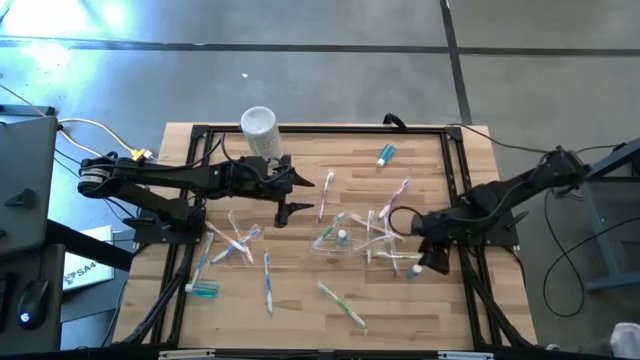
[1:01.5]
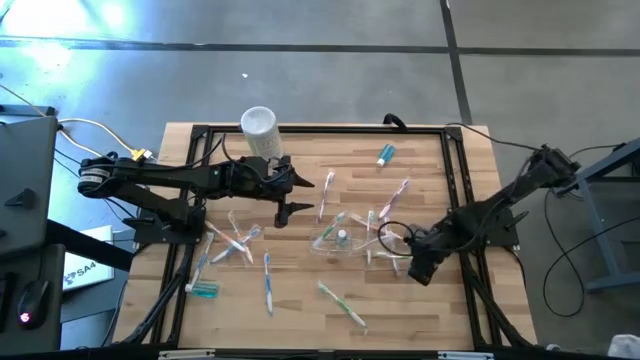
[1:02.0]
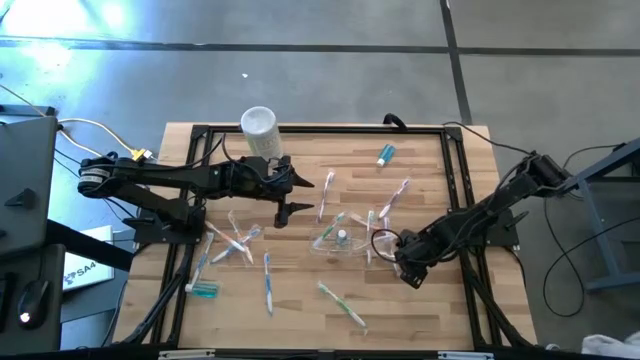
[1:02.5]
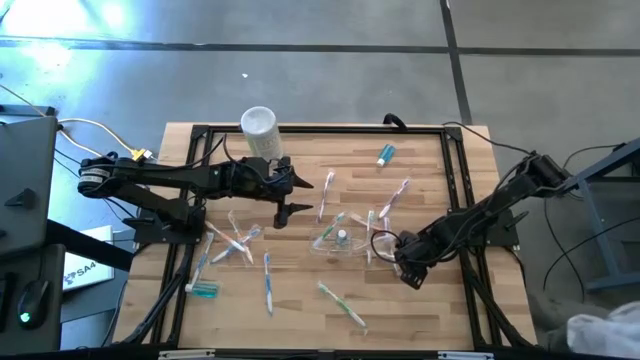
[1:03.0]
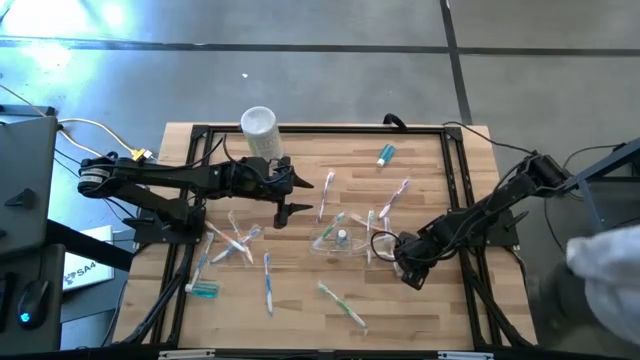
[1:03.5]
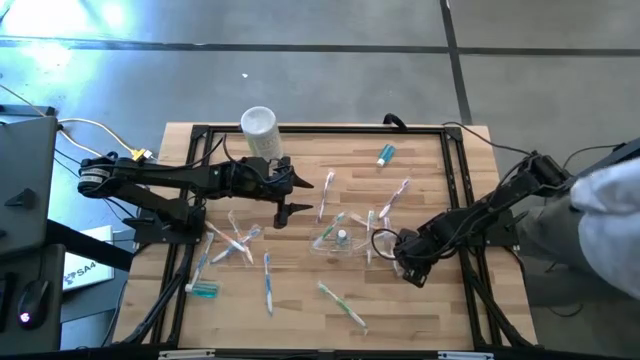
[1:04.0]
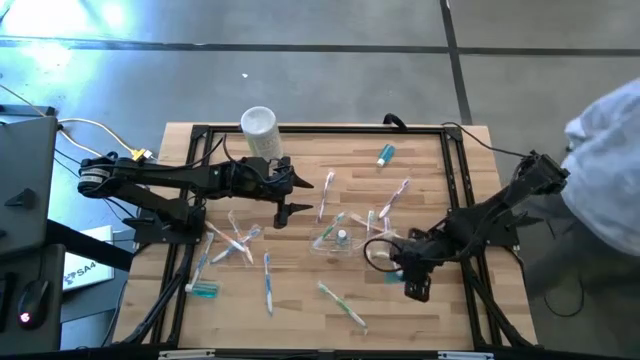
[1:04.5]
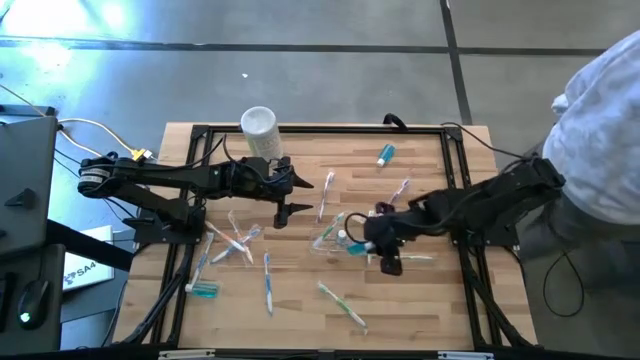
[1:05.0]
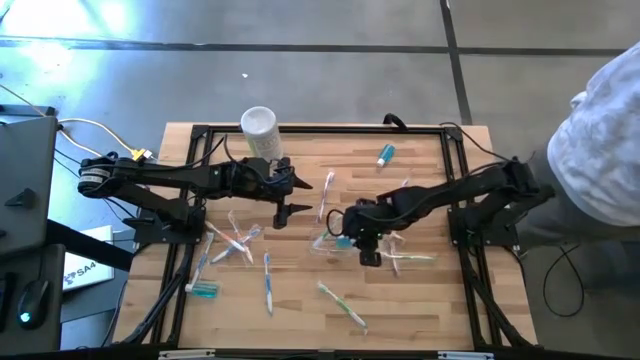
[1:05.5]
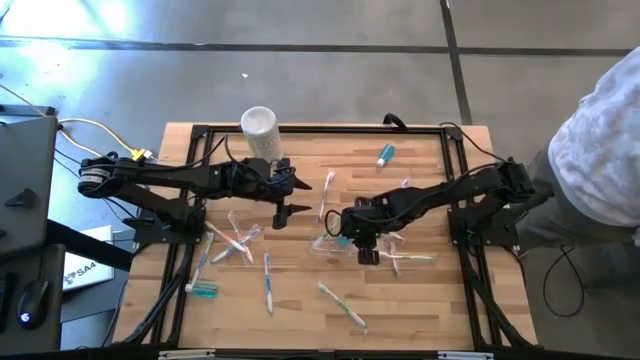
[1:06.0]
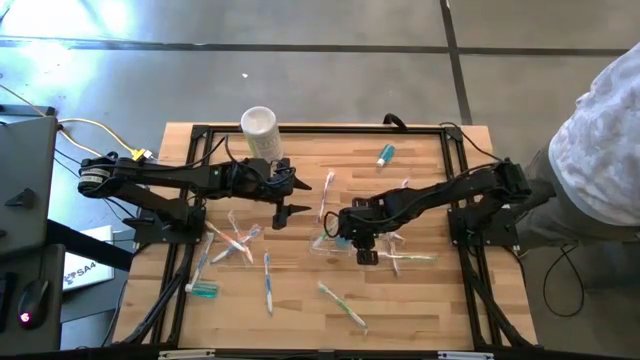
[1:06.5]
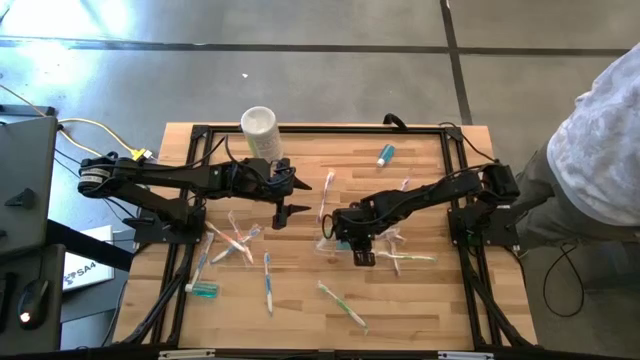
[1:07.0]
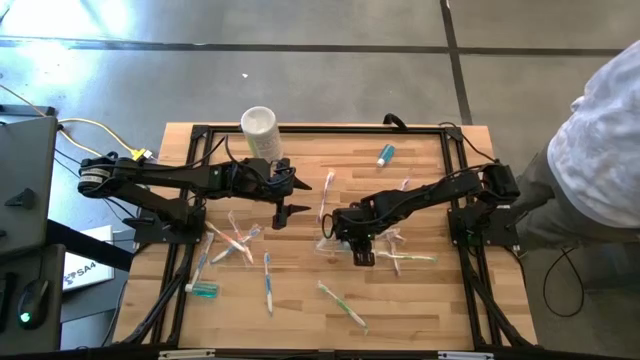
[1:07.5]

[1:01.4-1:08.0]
Task: Pick & Place toothbrushing station
Put the blue mouthwash into the middle section of the transparent organizer

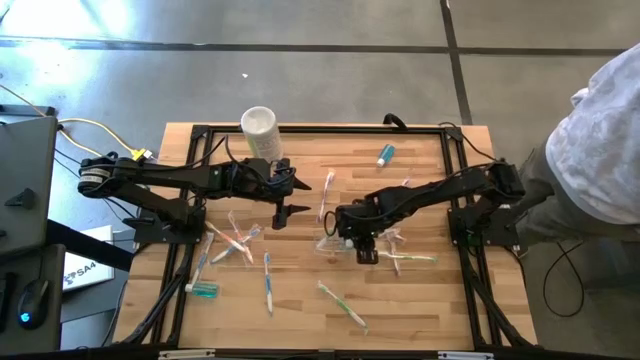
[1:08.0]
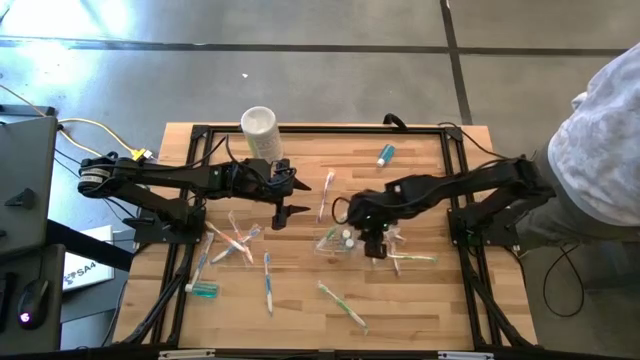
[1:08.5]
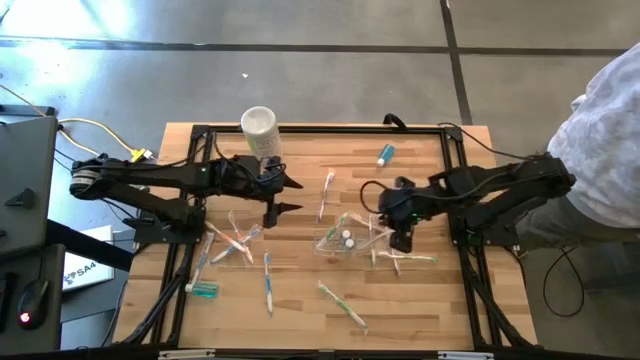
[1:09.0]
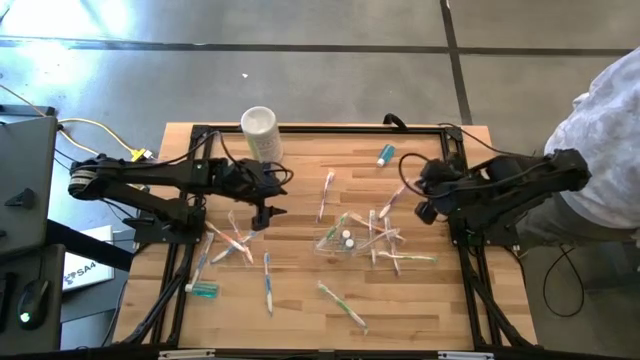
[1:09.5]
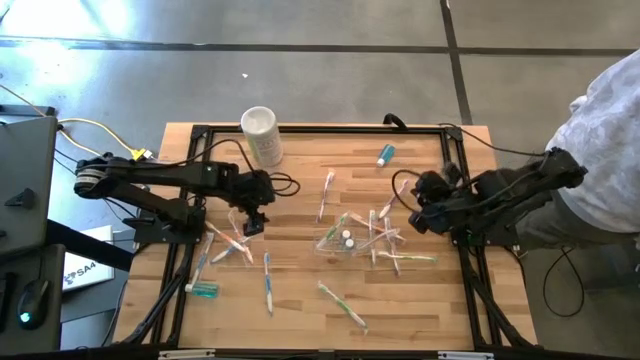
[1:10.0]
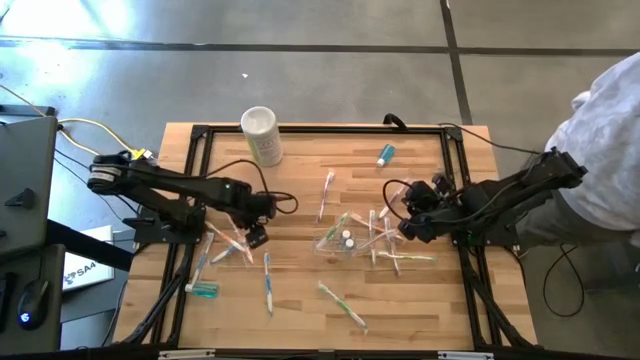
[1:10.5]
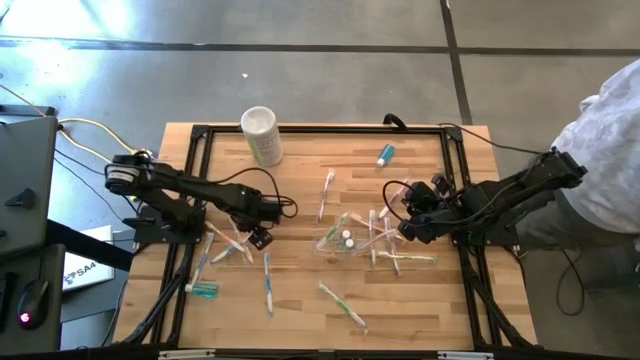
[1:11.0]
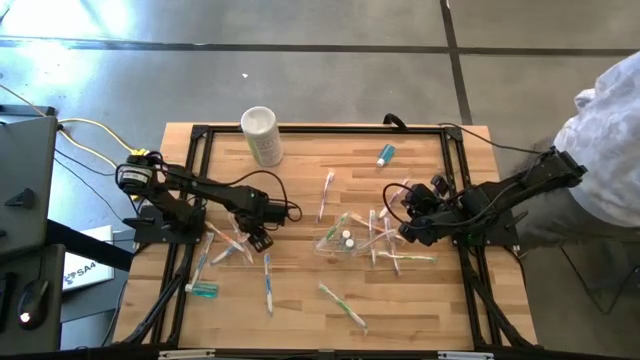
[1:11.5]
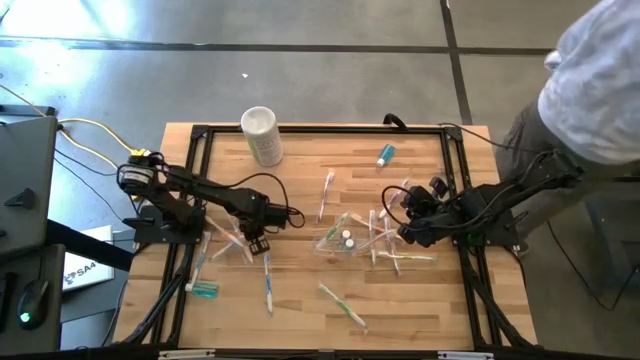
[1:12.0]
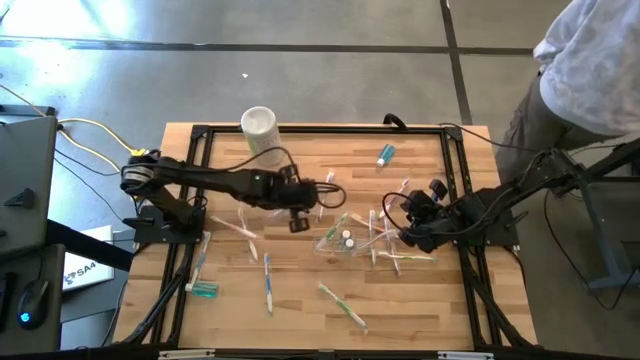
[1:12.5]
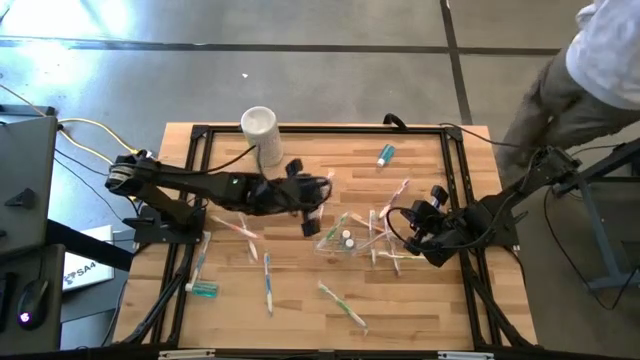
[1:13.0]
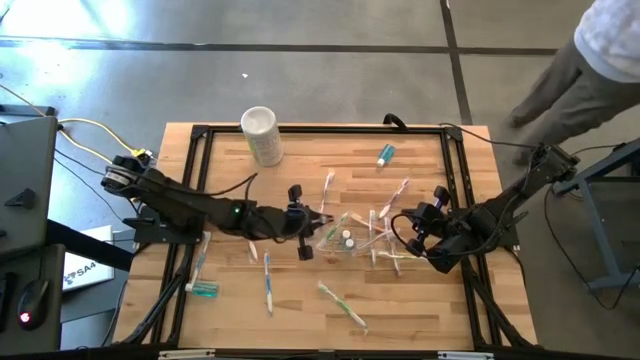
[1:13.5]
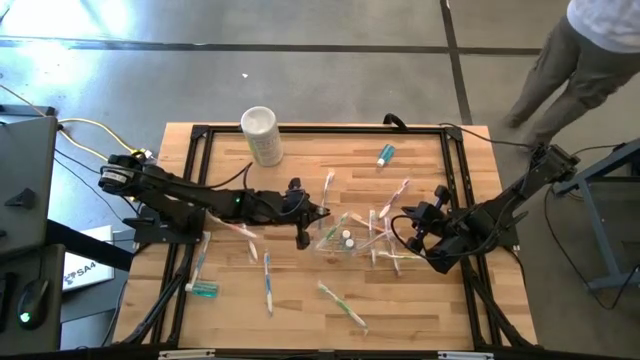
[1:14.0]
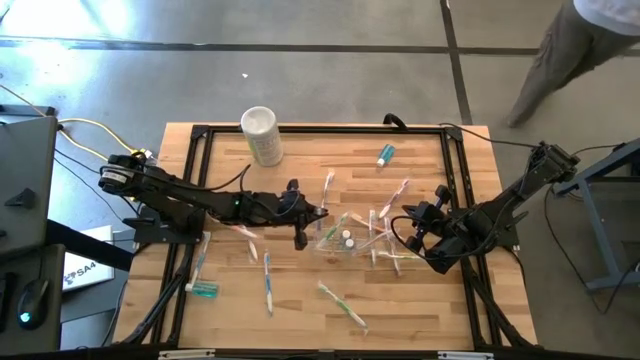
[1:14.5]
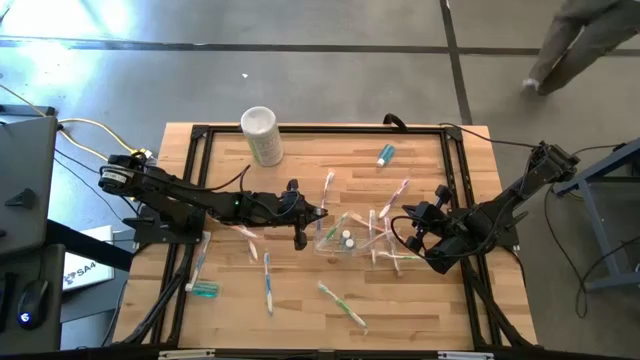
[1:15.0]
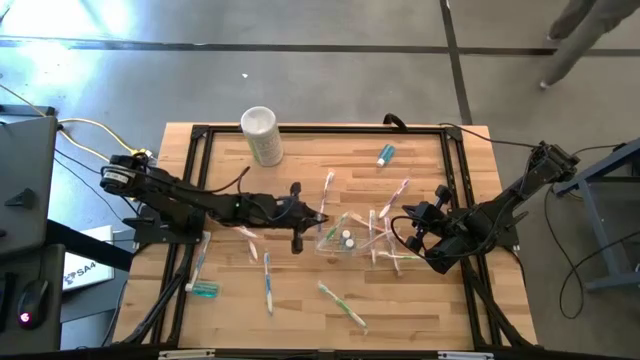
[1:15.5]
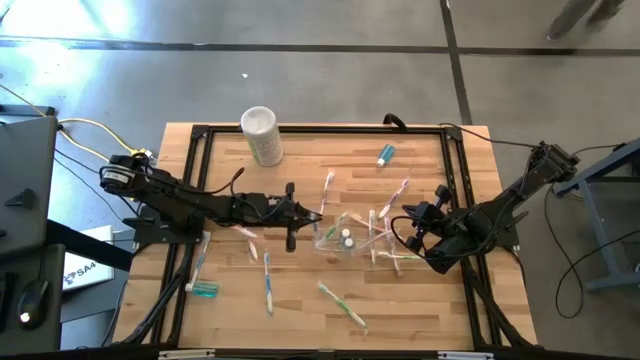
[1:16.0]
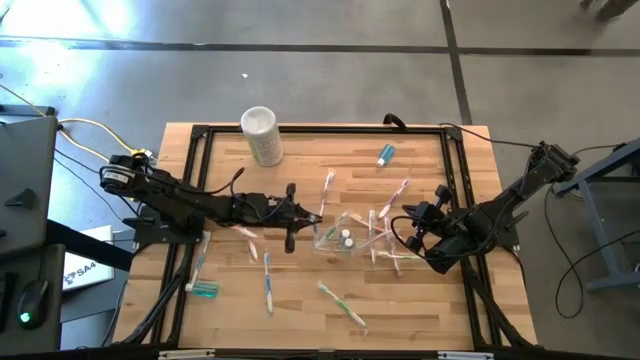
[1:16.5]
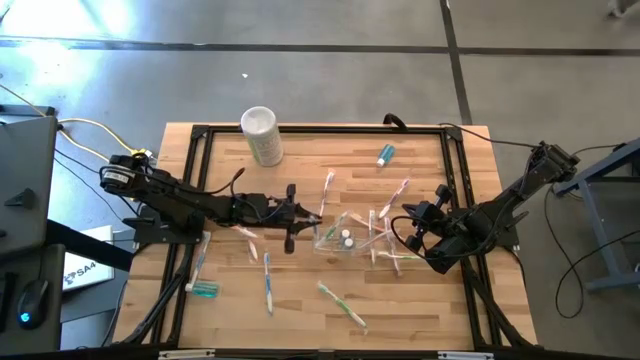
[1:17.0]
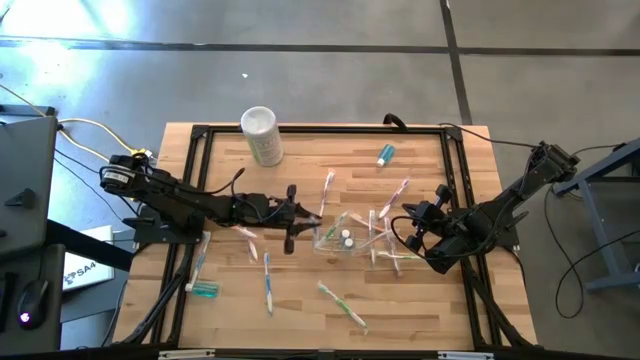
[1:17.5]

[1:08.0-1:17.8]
Put the blue toothbrush into the left section of the transparent organizer

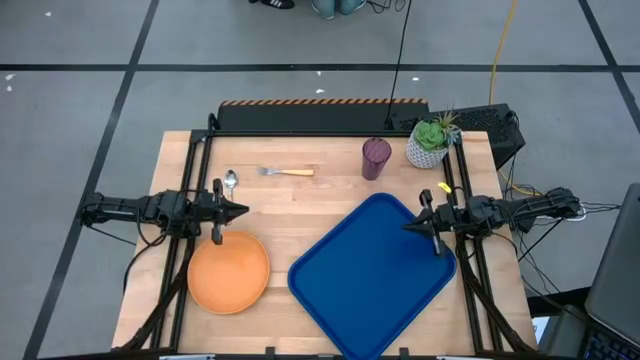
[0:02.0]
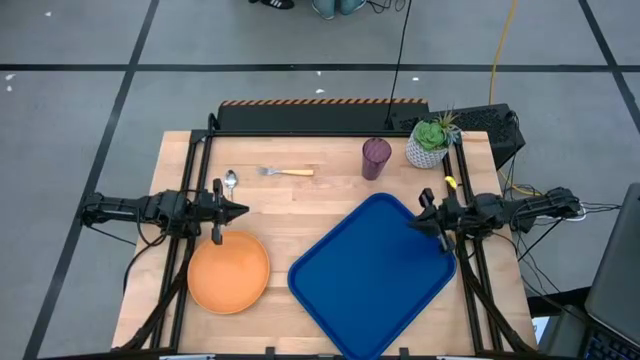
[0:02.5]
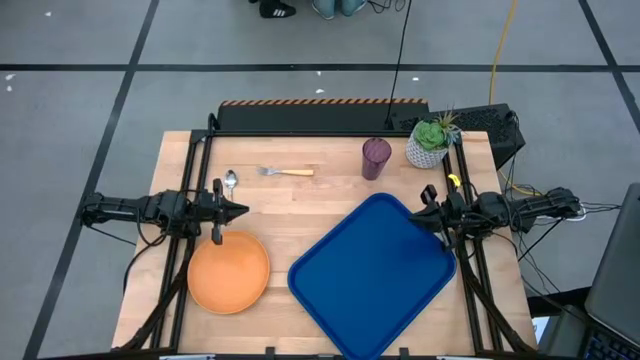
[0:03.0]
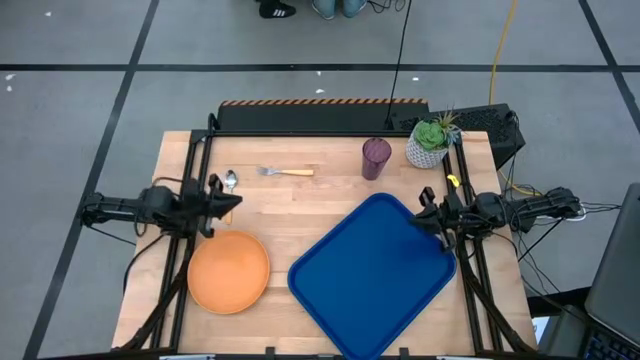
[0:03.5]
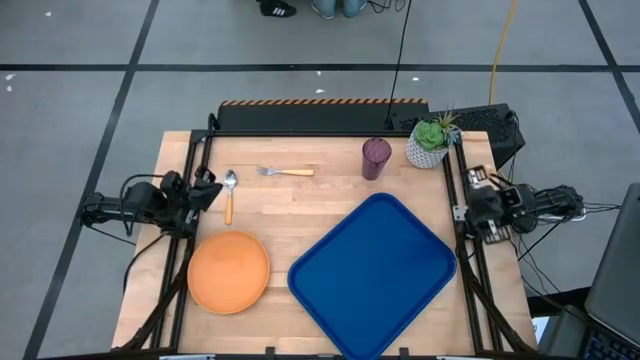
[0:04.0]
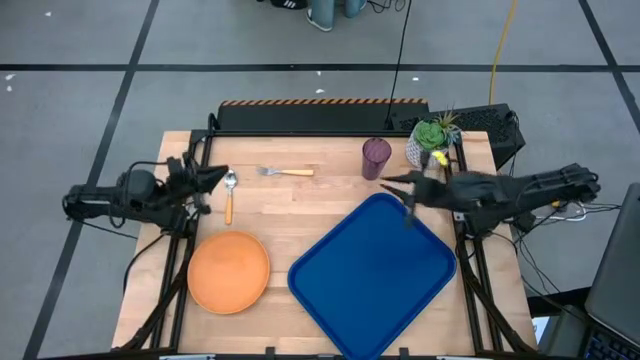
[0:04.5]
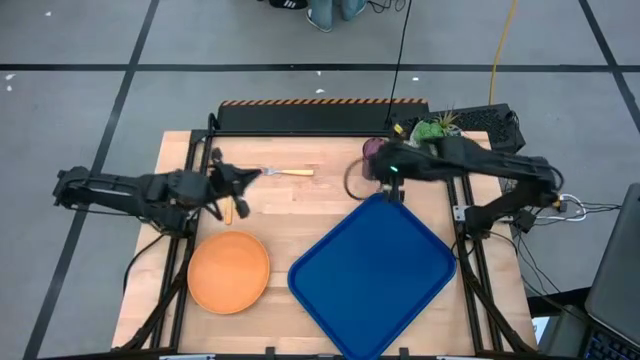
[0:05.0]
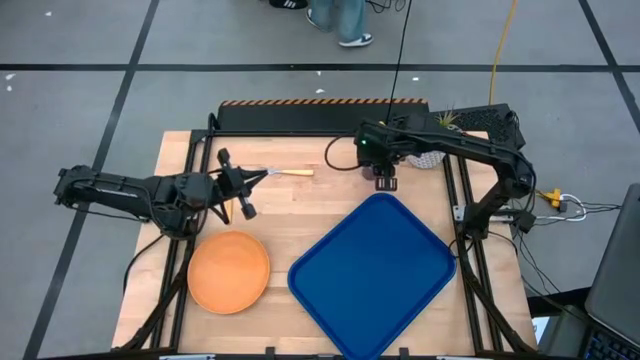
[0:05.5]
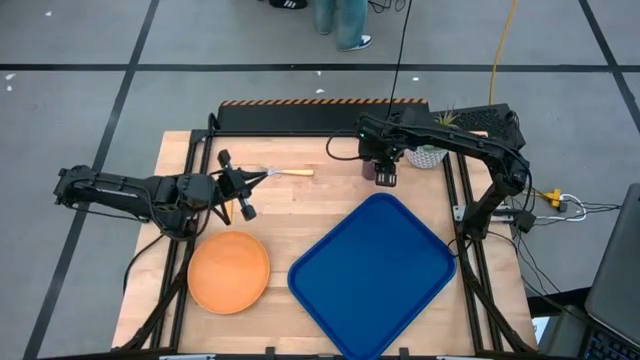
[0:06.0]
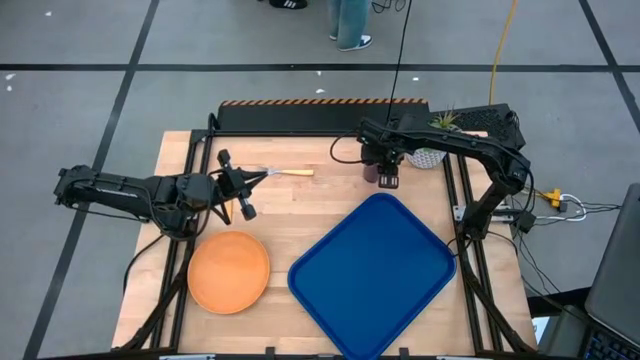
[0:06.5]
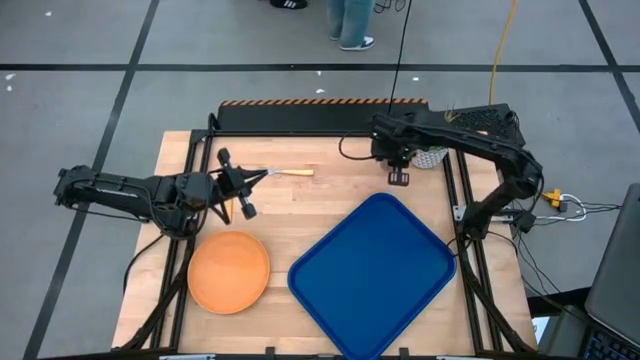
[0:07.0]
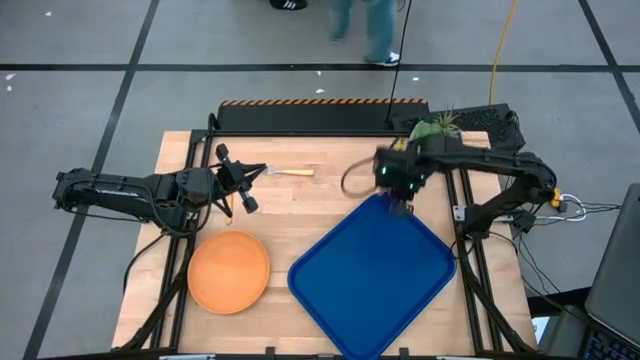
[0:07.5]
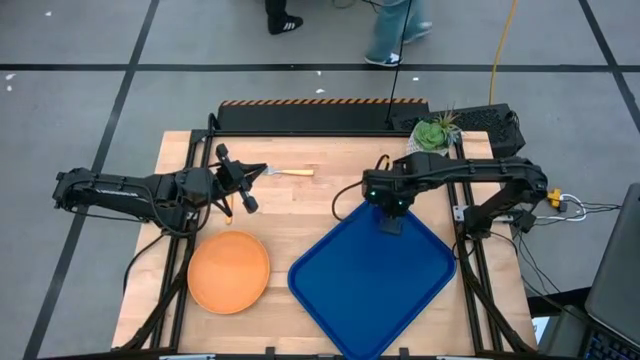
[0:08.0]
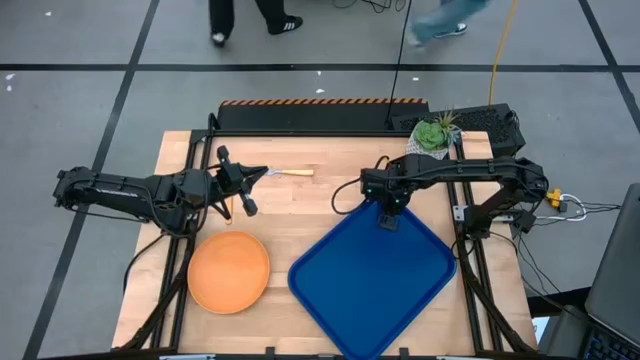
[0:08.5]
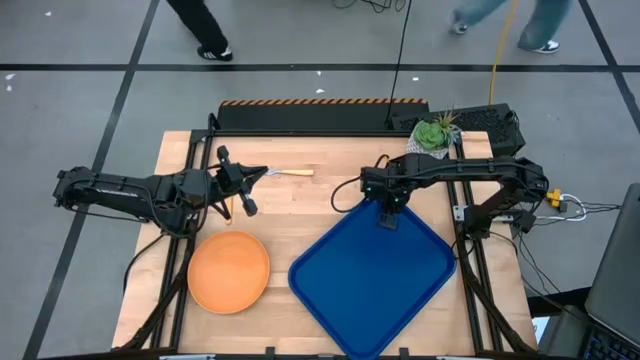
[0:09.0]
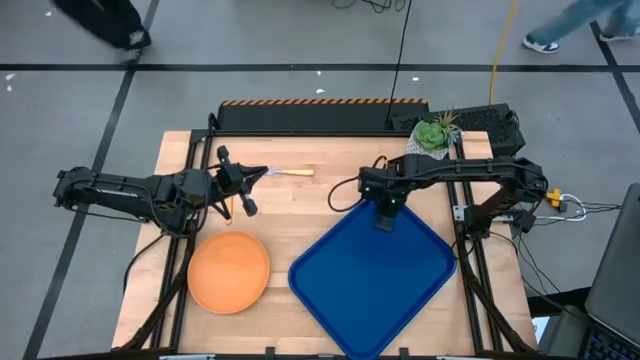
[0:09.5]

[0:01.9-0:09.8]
Task: Pick and place plate/cup/fork/spoon on tray
Put the cup to the top right of the blue tray
